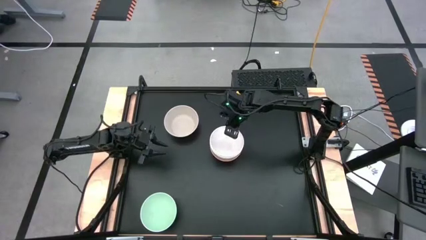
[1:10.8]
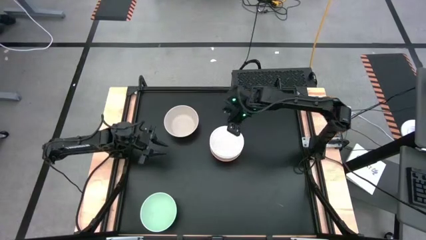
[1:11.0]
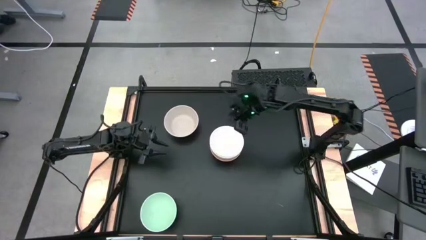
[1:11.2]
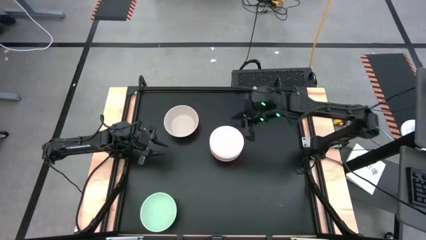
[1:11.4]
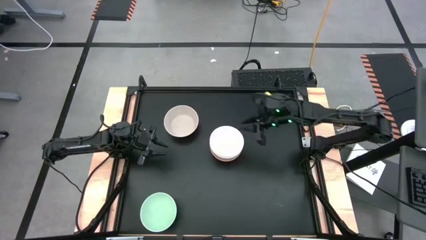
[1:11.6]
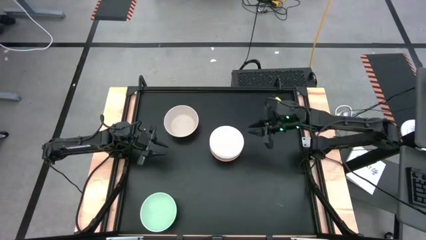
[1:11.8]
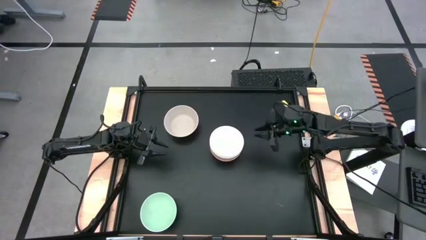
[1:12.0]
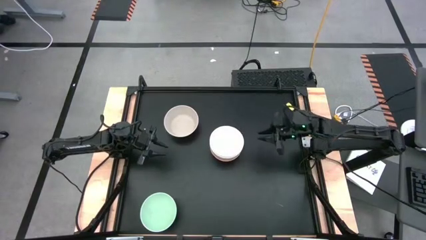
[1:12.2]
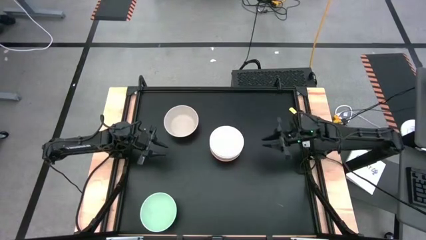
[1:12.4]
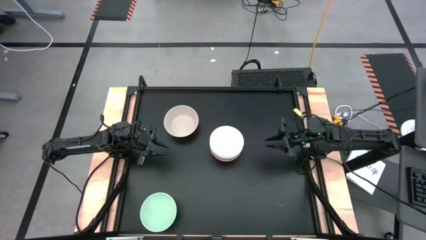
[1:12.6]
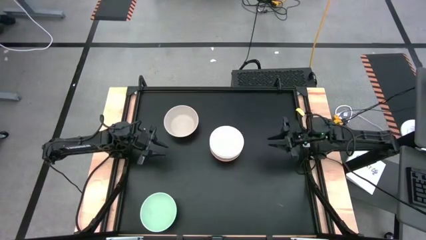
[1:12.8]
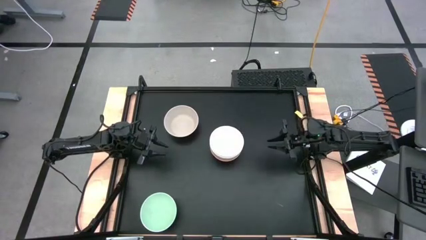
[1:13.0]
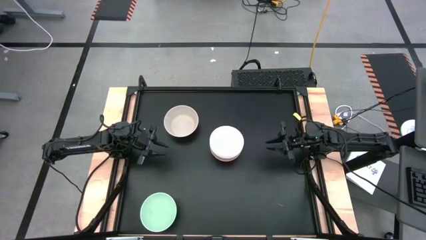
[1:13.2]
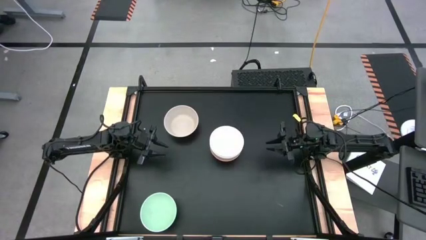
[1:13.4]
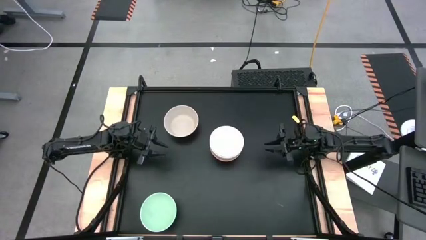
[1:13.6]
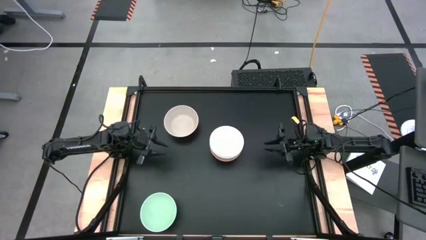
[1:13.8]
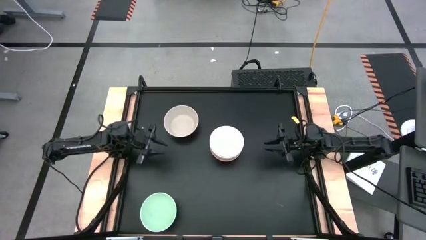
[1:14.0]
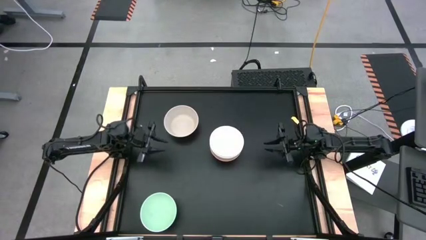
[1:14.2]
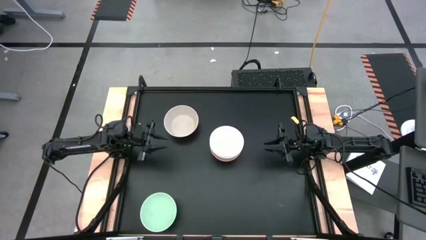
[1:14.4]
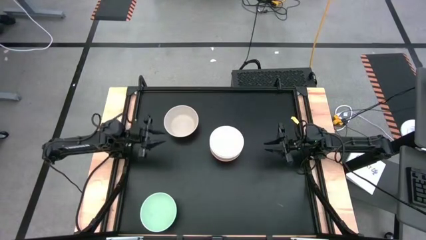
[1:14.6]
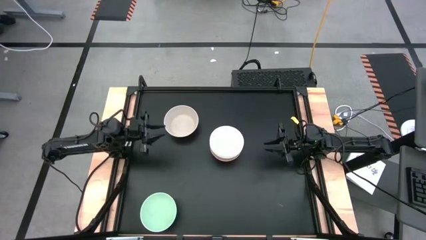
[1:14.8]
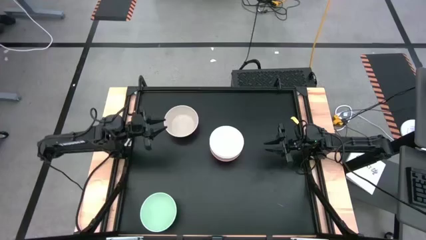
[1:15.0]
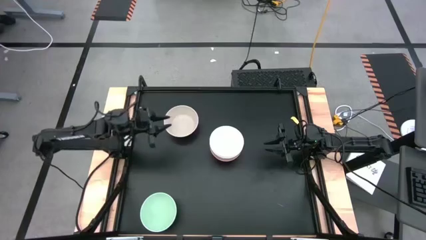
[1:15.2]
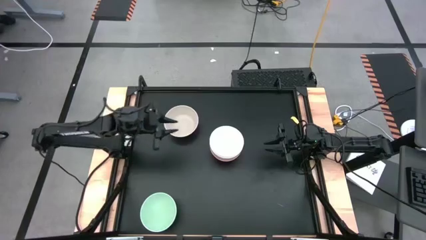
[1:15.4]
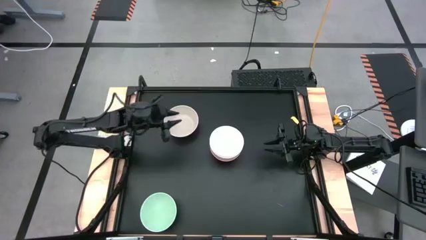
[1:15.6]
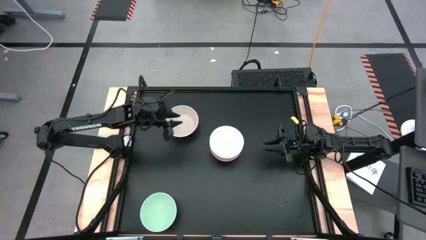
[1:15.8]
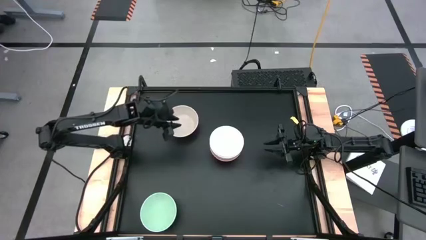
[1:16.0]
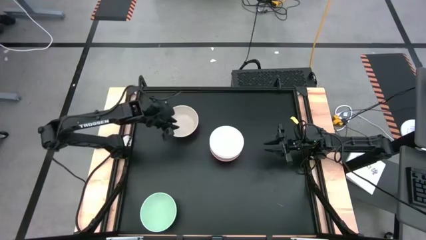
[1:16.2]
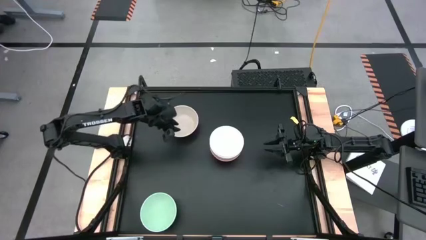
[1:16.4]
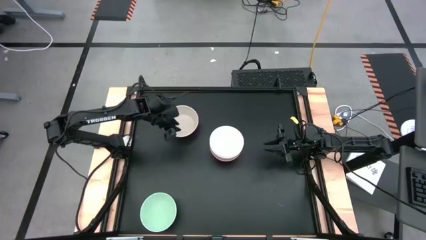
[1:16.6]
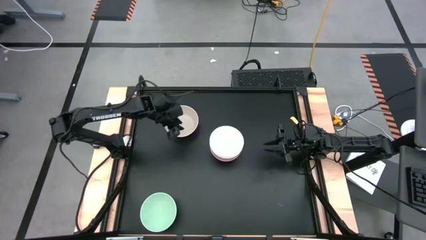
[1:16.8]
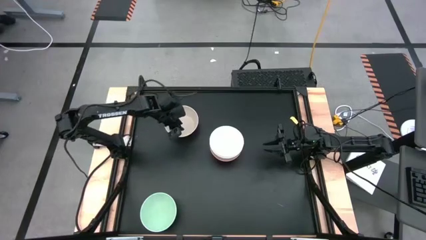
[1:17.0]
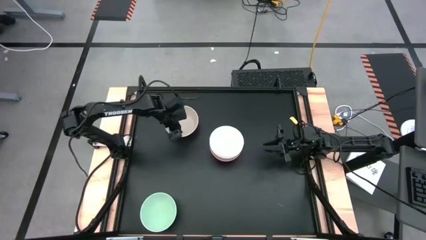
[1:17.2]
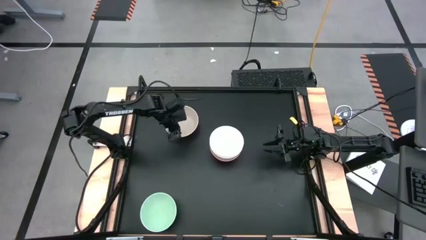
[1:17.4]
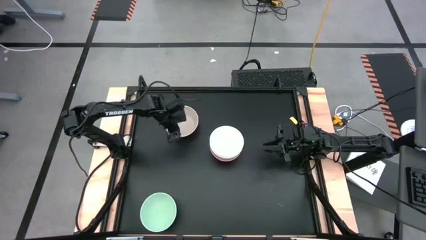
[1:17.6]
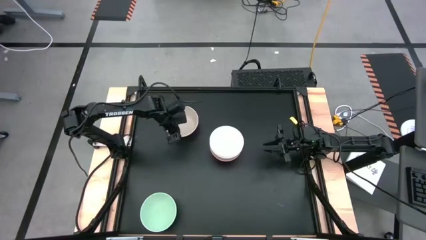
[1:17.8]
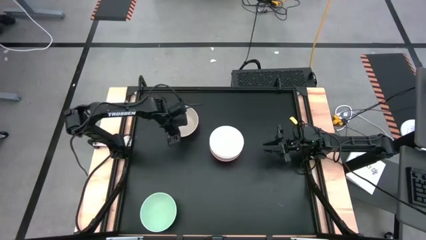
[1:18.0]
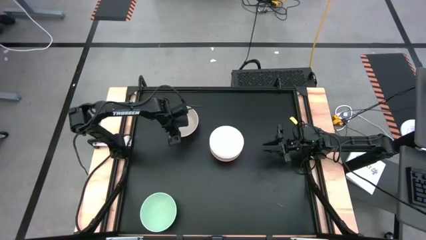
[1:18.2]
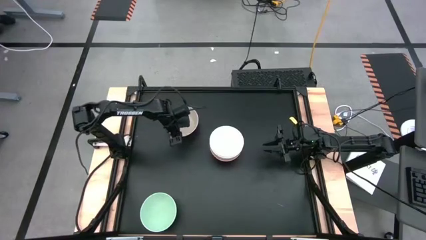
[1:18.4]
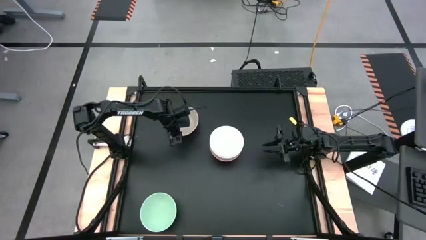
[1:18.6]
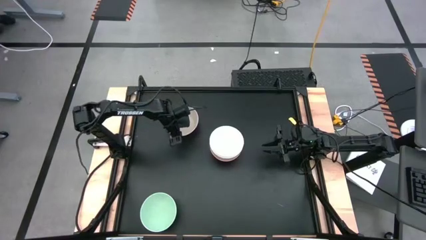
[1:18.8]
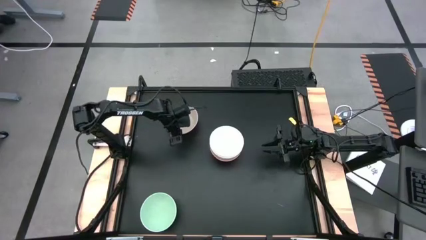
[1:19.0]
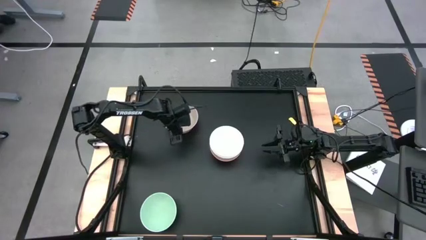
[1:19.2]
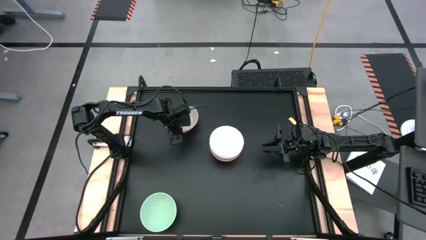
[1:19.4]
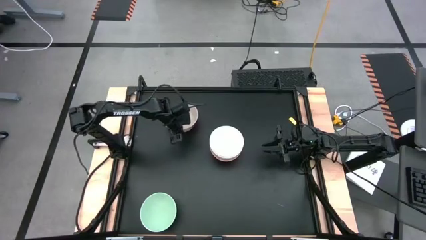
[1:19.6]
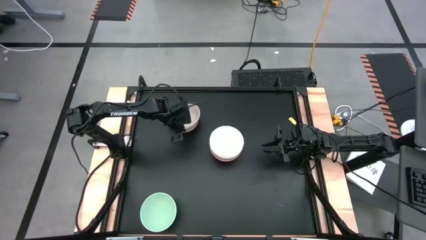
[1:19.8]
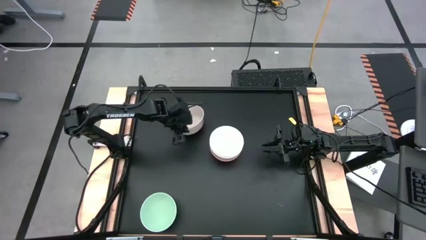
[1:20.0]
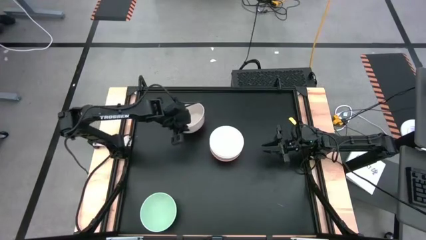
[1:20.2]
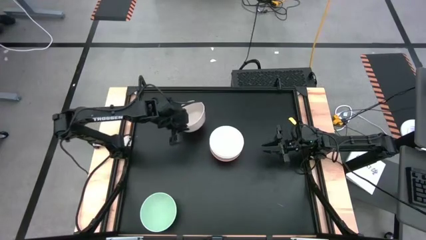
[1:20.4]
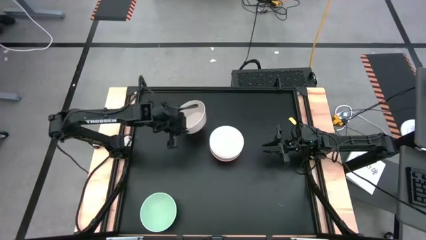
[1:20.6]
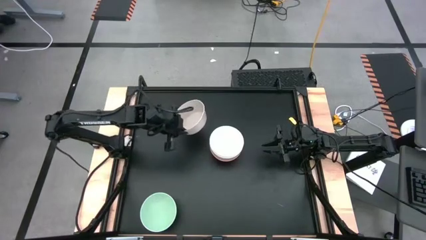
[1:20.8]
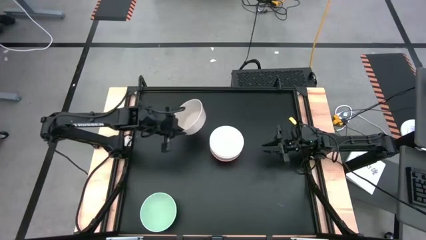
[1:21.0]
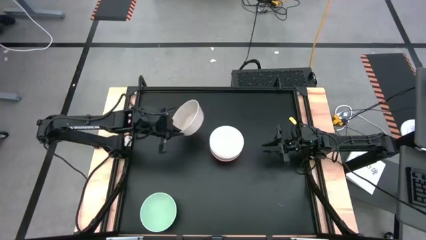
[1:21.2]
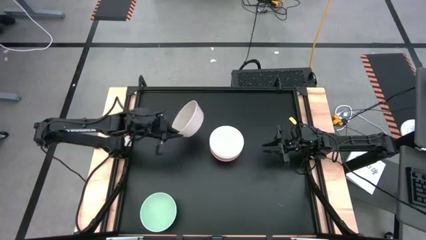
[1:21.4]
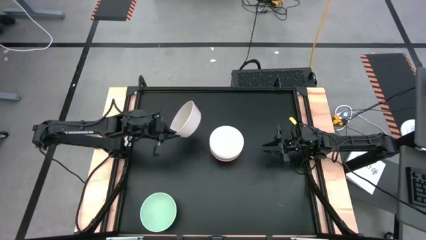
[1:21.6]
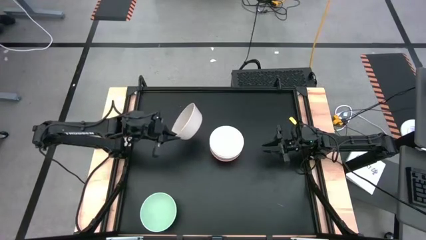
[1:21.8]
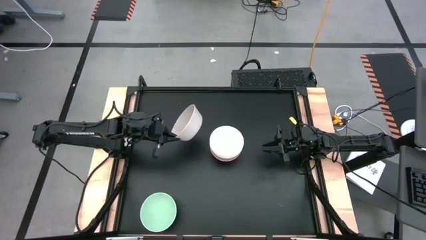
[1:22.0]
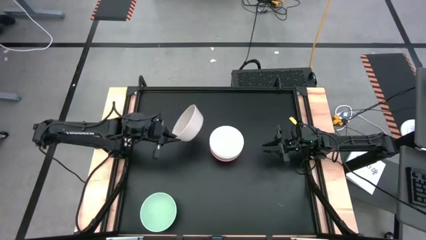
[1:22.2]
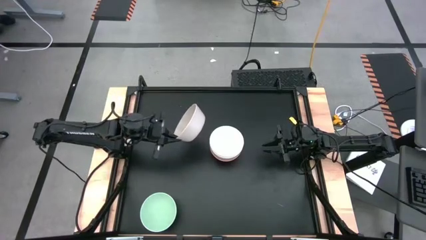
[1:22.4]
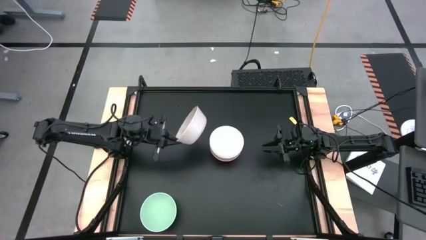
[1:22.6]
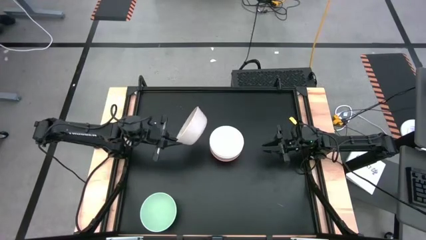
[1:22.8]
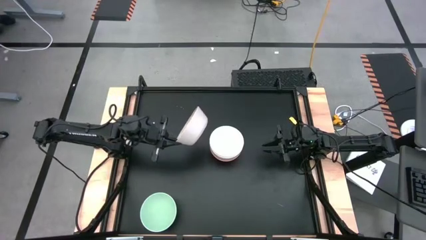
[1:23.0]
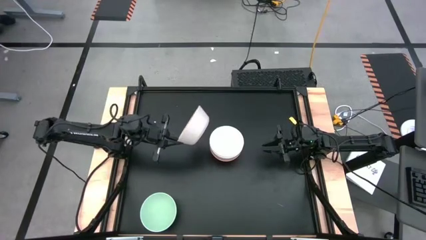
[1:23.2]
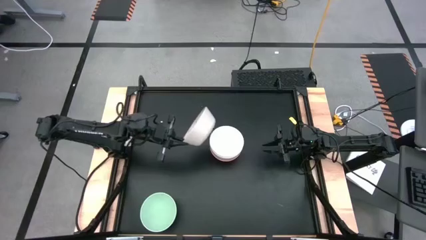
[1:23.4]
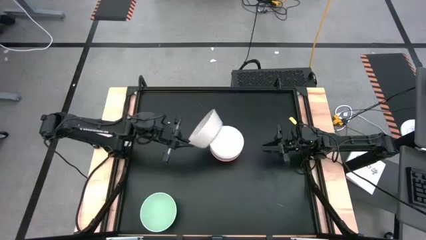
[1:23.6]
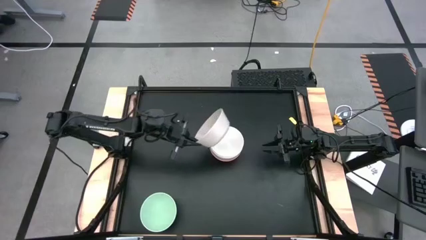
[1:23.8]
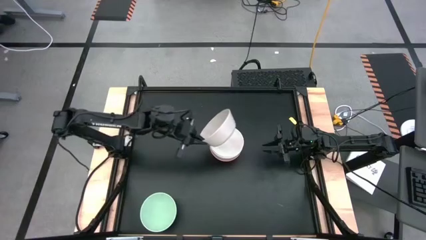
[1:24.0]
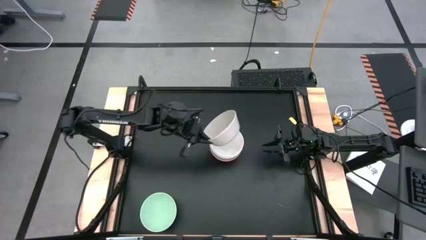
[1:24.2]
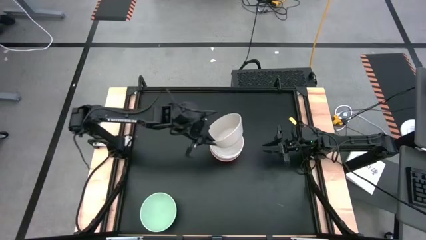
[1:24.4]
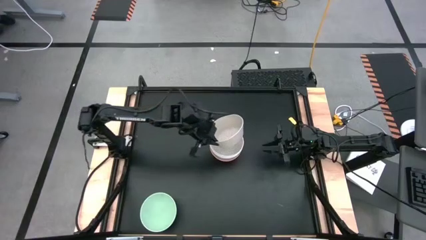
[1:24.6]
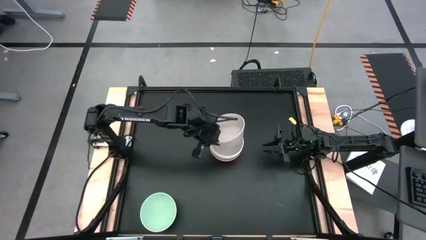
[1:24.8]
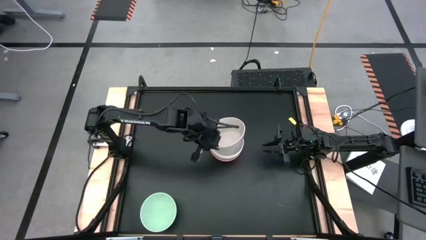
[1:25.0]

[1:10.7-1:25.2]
Task: Nest bowls inside each other
Stack the gray bowl on top of the white bowl

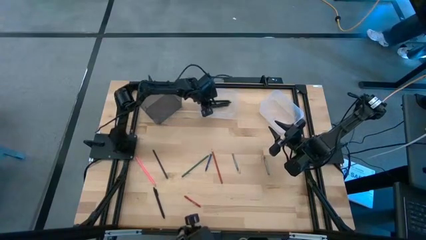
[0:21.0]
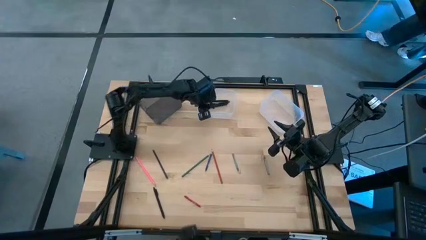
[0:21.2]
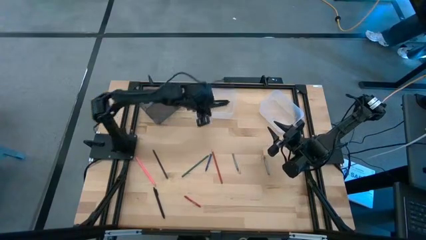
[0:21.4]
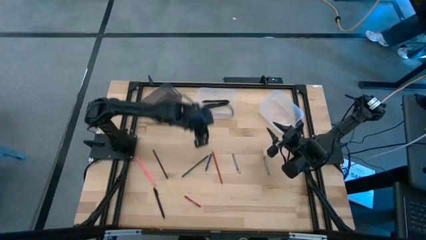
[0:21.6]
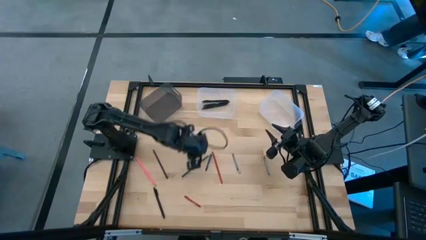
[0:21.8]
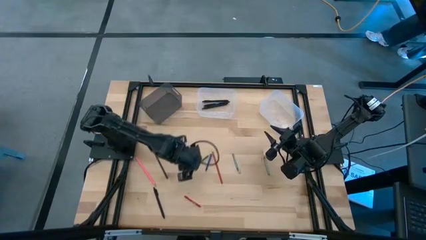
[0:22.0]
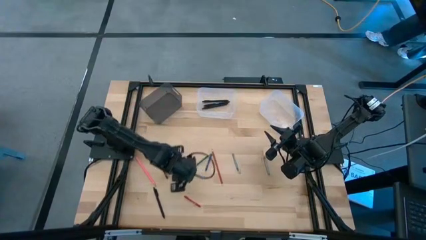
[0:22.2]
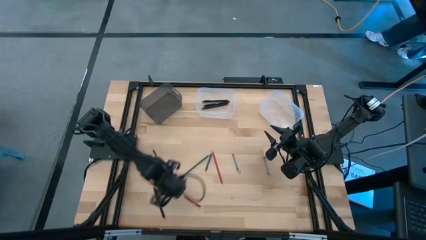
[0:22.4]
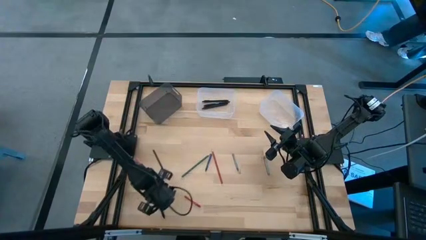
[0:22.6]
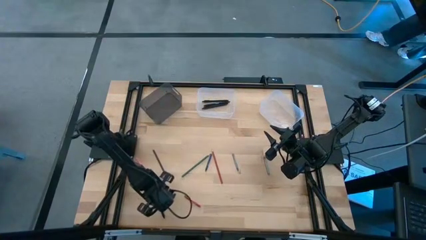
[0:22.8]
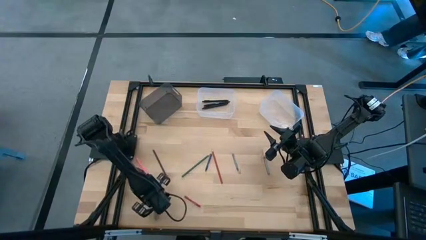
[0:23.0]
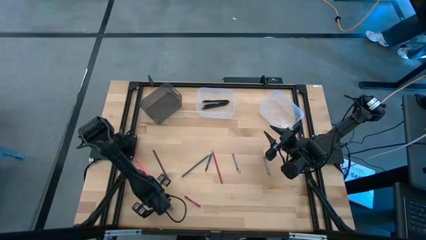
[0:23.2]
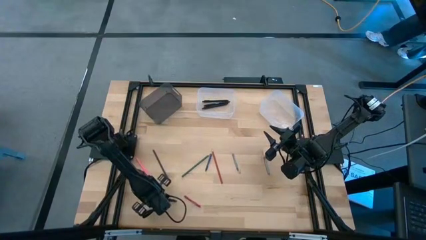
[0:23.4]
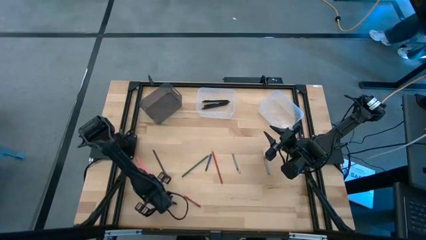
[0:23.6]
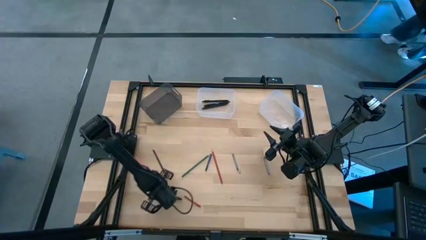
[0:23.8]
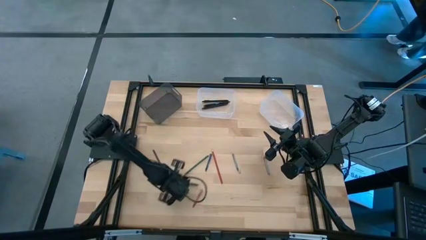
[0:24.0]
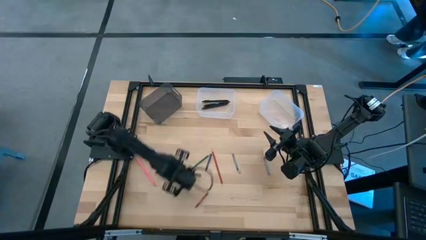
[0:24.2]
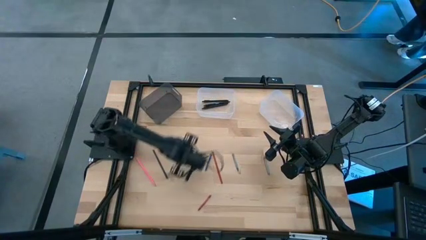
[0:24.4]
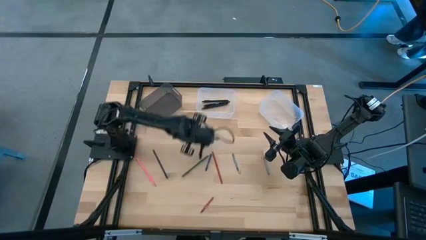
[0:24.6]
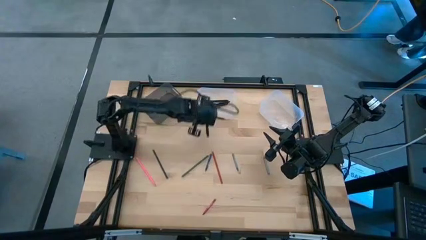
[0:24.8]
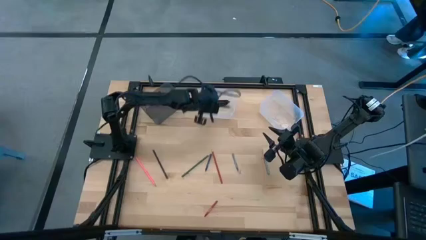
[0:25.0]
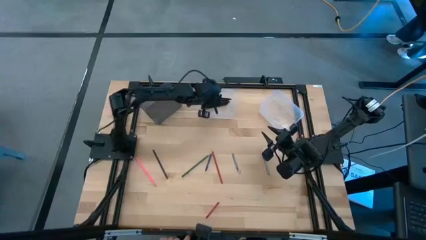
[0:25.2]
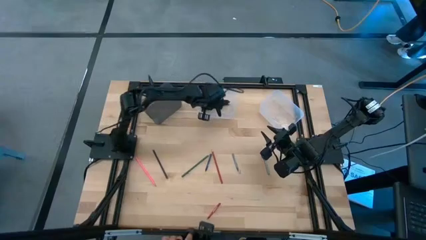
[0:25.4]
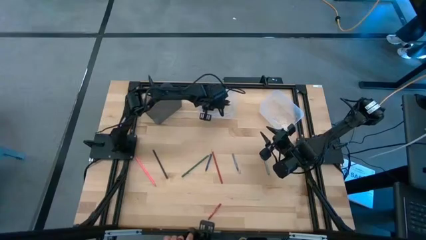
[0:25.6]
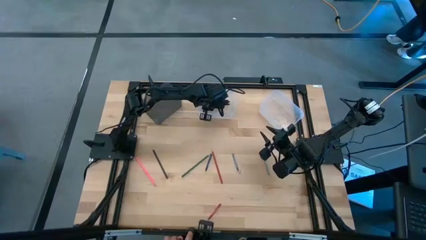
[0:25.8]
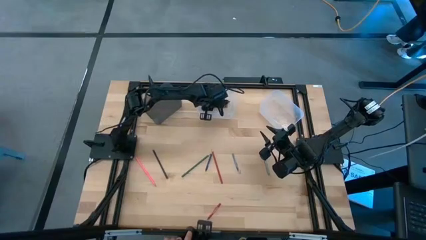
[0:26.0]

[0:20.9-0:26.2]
Task: Sort crayons/erasers/pens/pencils in bins
Put the black pen into the left transparent bin
